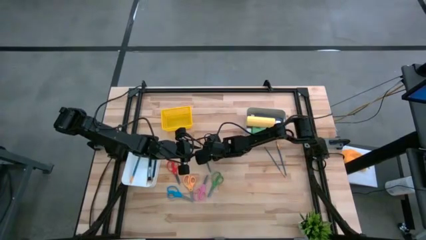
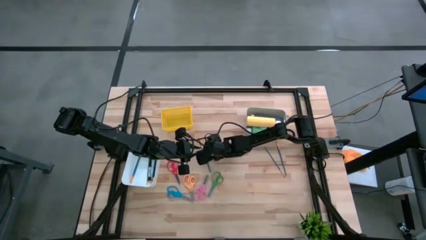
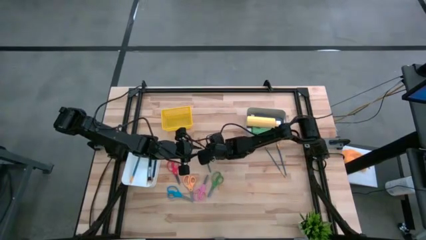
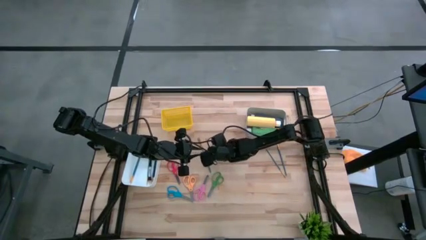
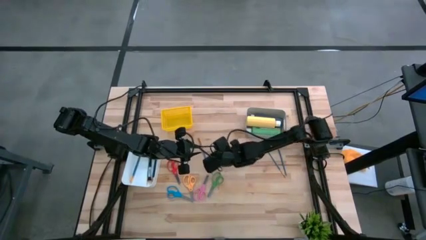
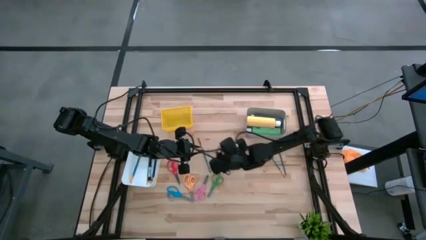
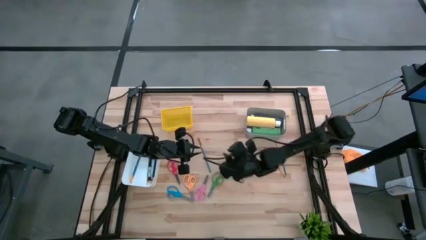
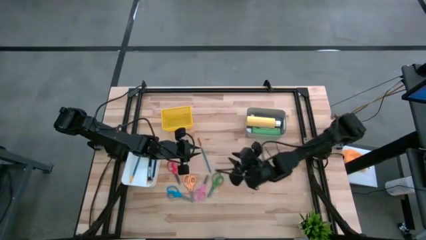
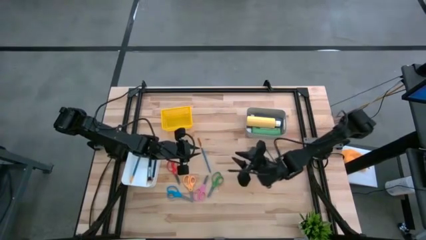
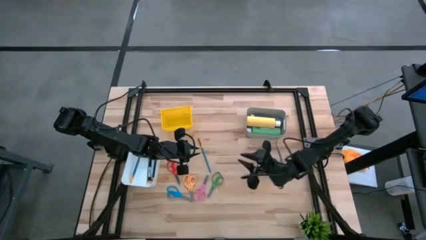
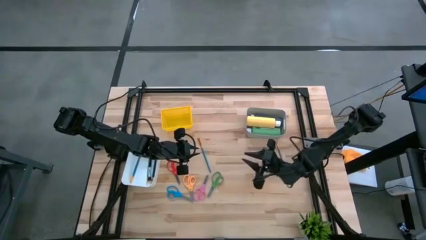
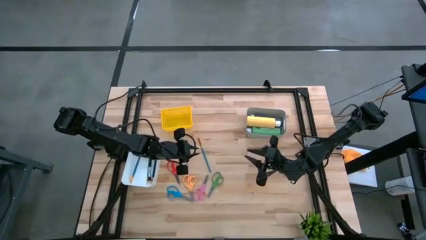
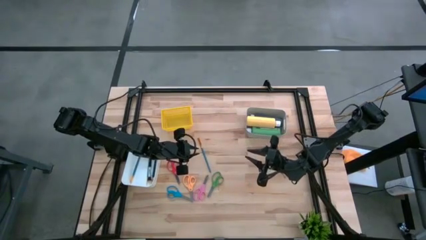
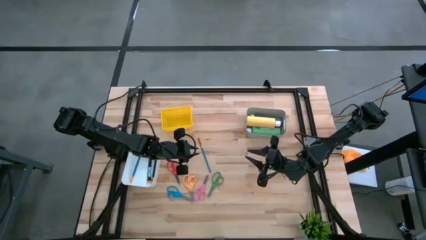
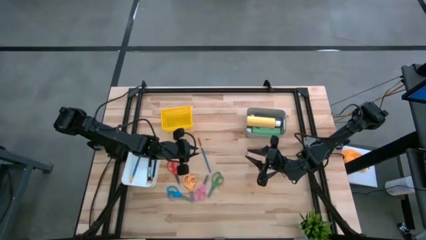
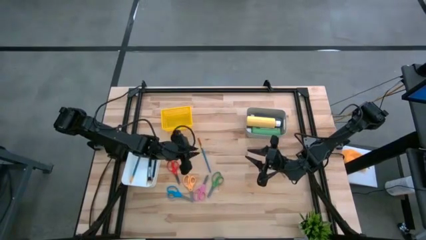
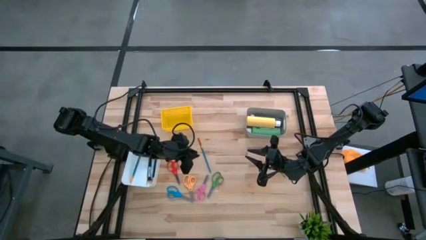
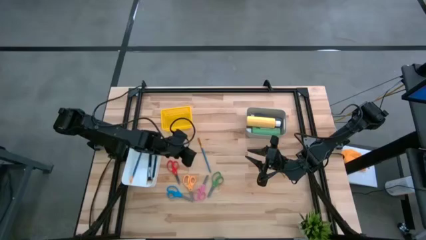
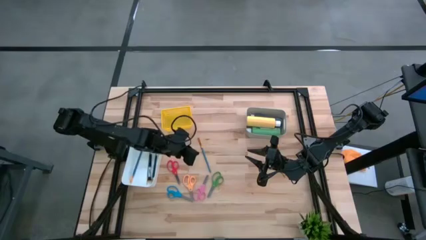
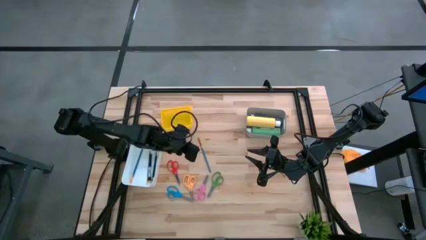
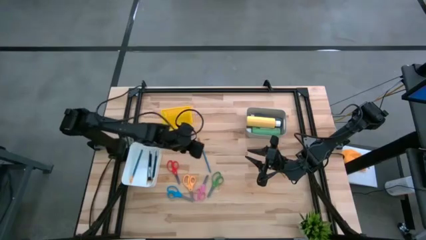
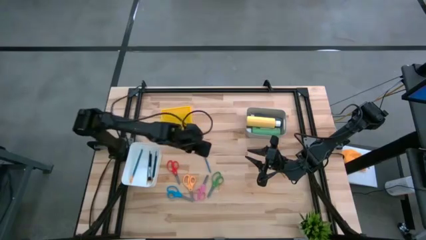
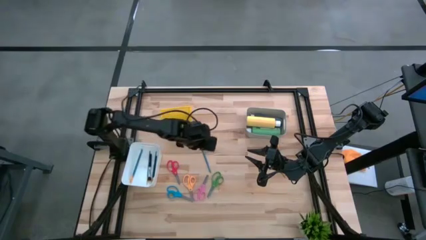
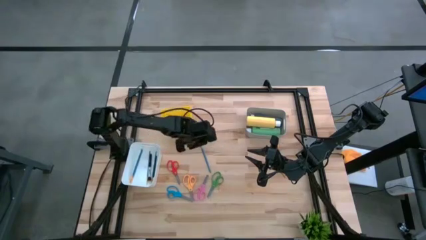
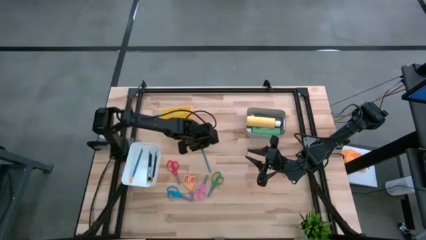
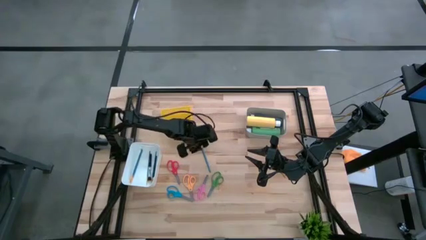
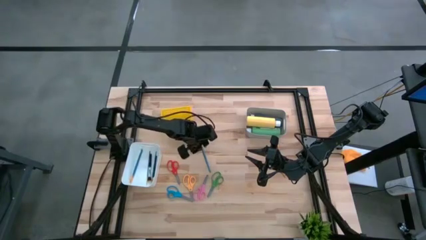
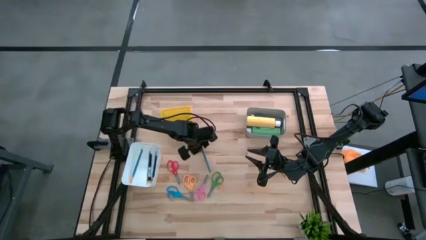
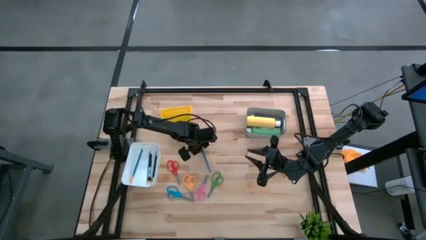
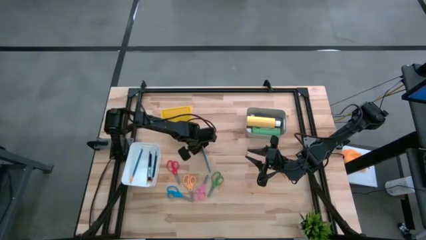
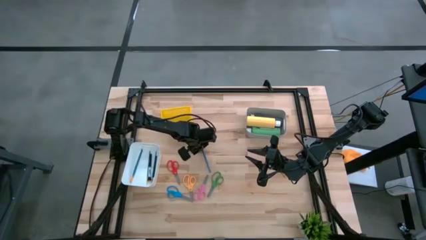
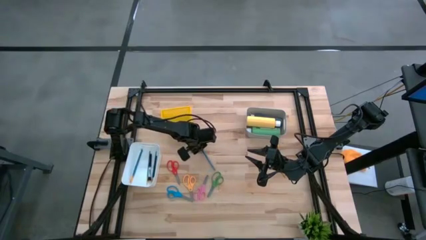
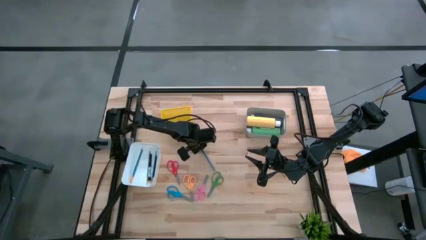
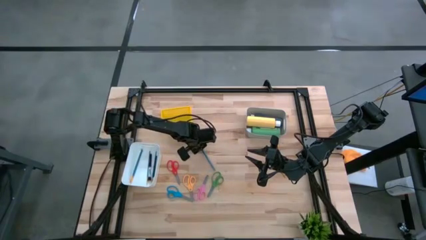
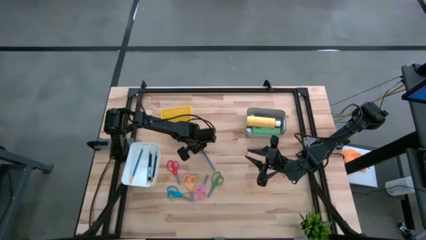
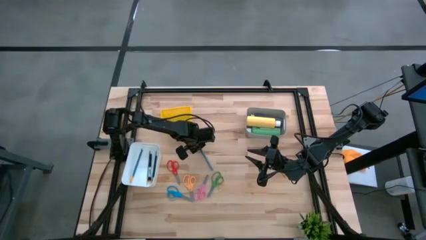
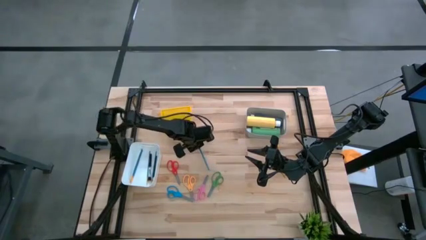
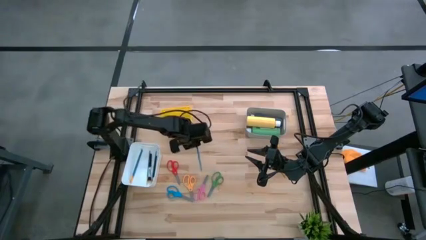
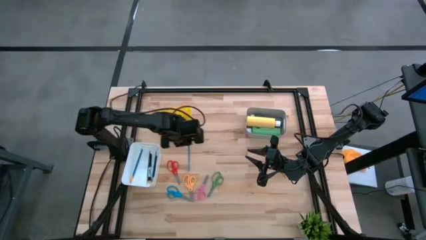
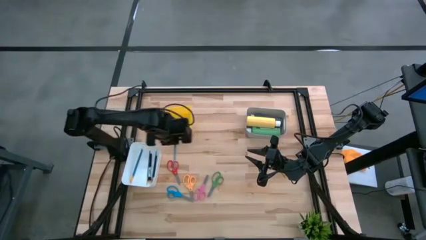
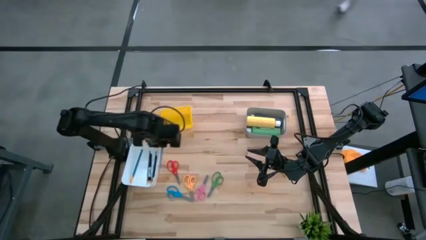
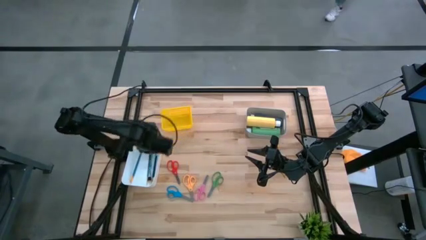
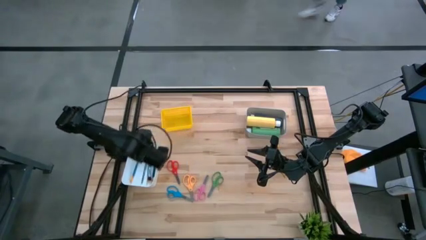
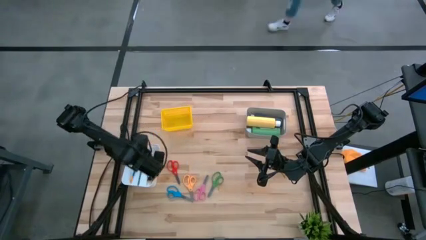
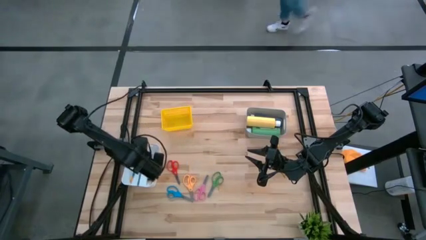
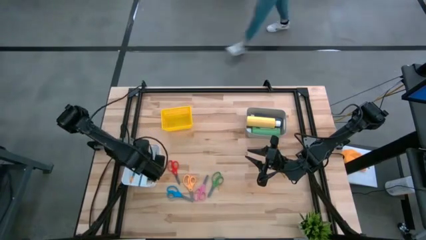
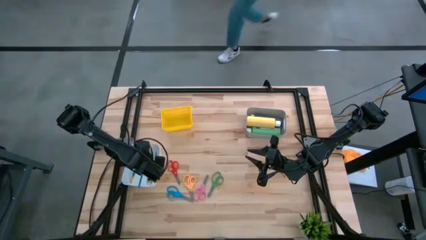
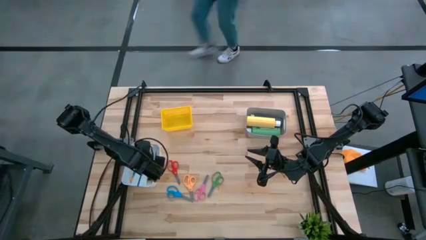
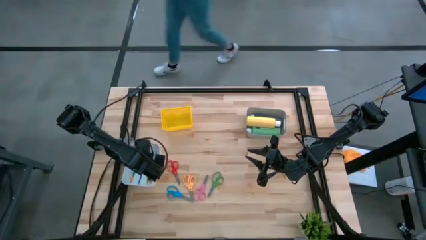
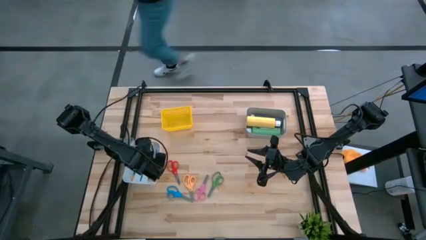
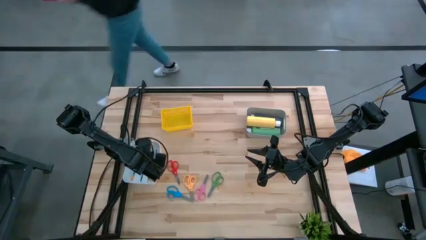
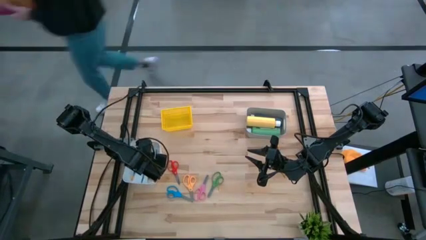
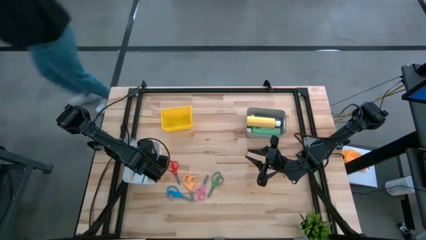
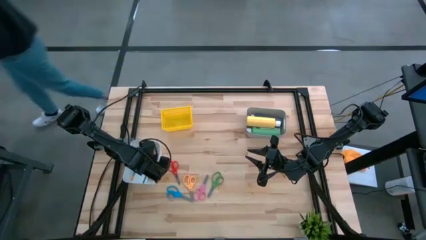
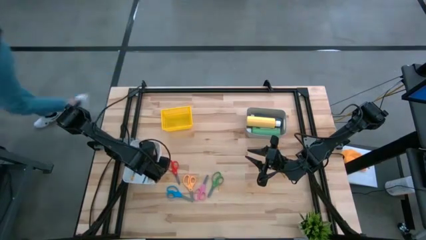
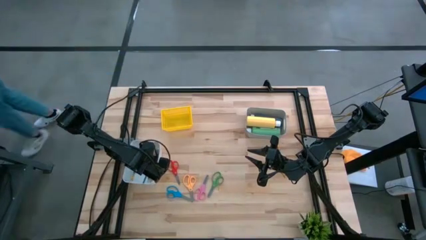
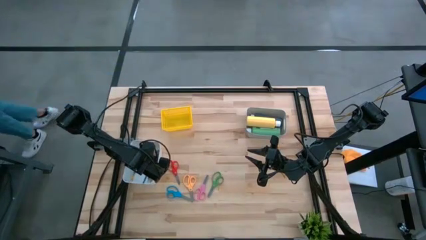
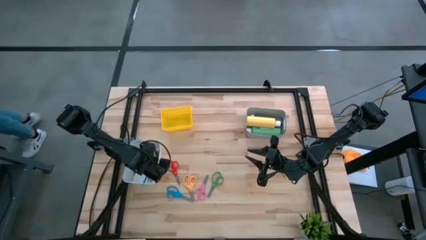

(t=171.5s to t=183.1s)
Task: Pick & Place Paint Supplies
Put the blue paintbrush into the white bin

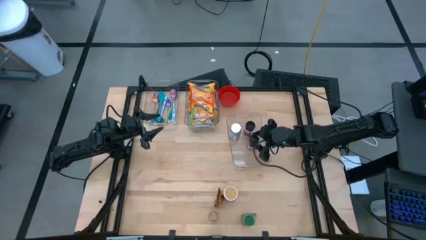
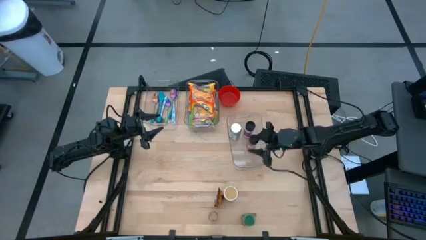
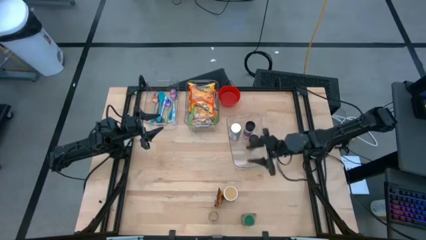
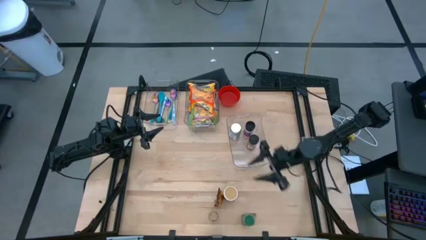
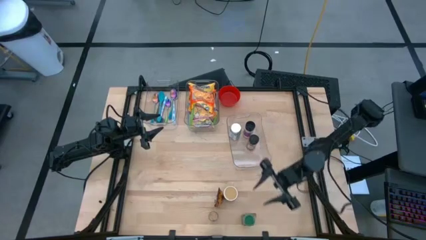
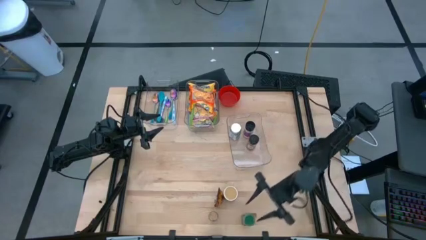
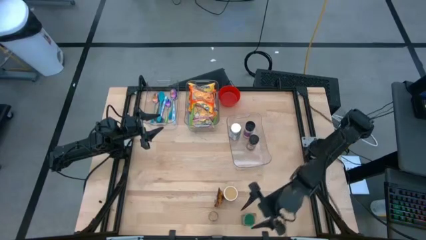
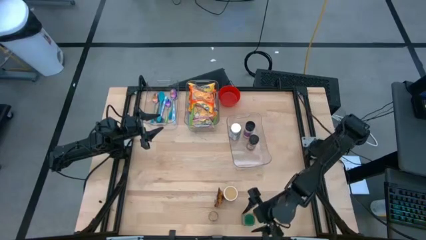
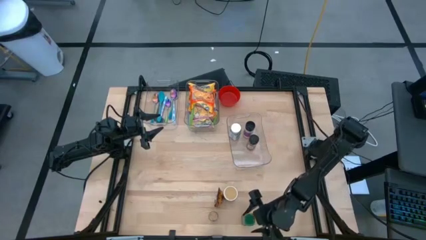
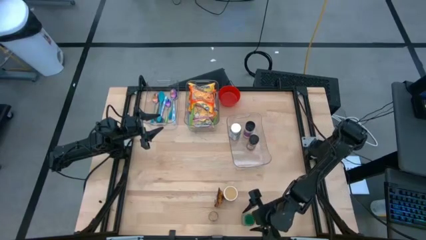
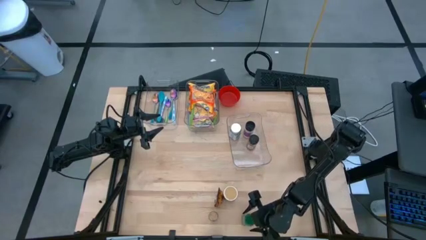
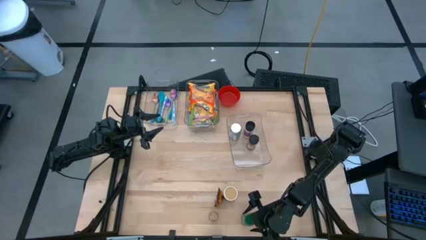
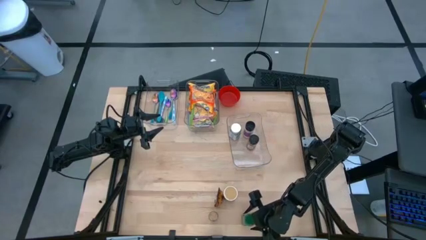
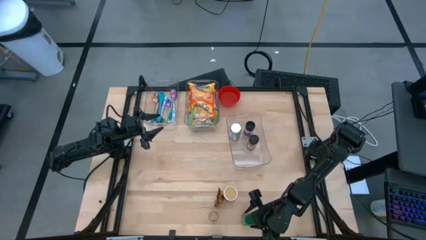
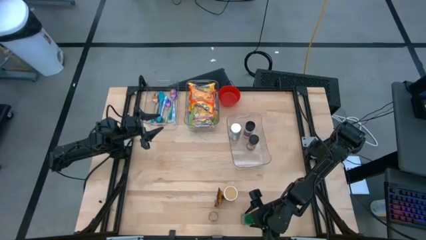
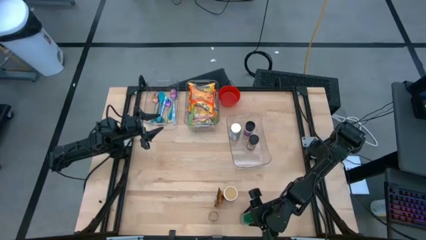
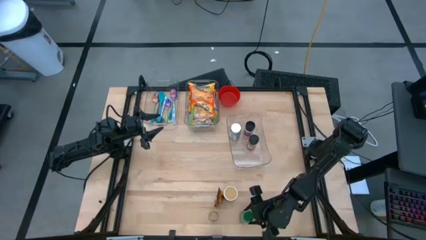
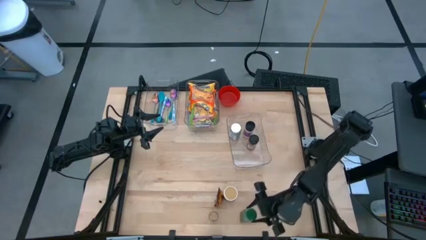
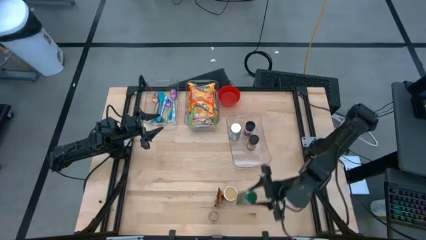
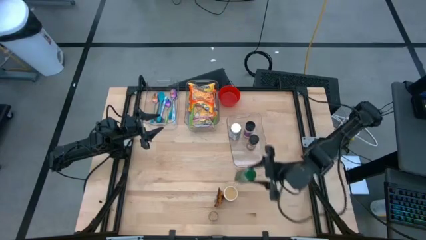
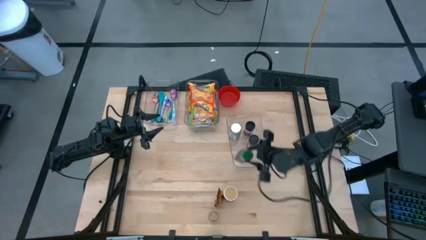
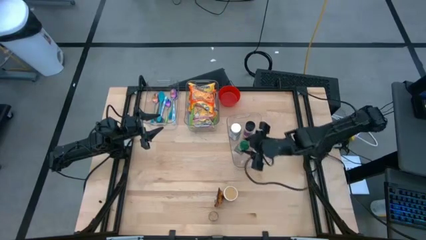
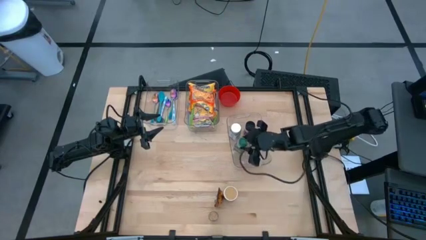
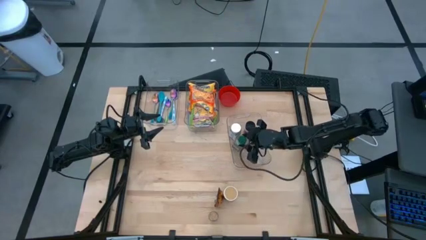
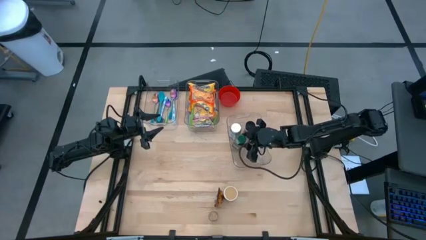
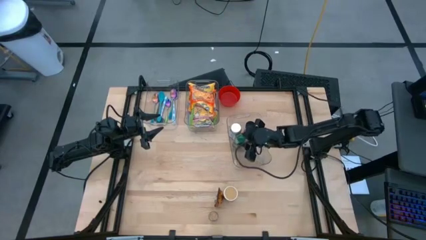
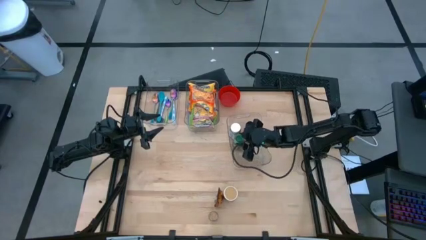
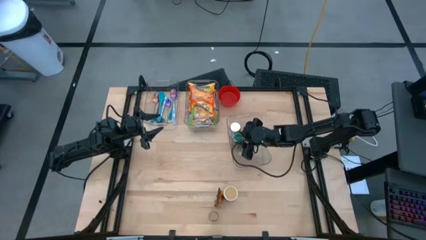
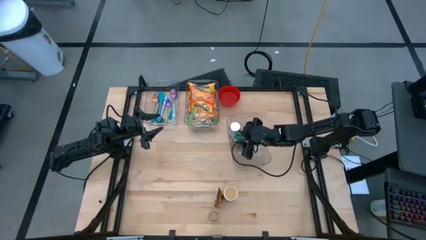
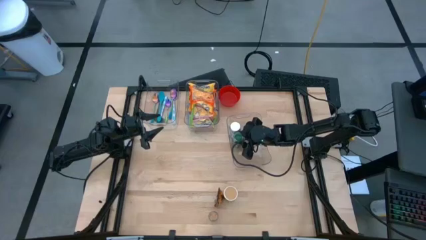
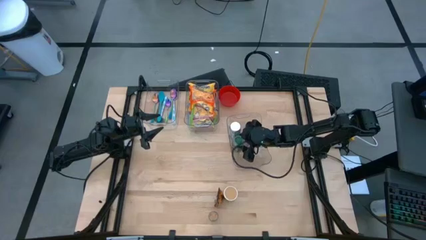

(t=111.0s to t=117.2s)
Task: Pick & Place Food Item
Put the green seasoning bottle into the bottom right transparent bin
